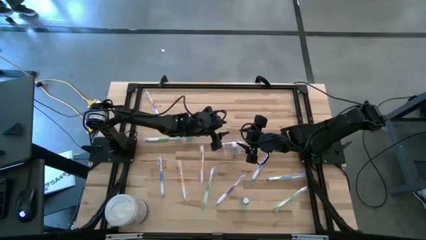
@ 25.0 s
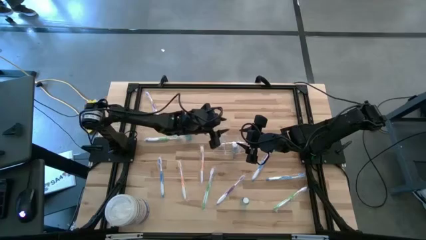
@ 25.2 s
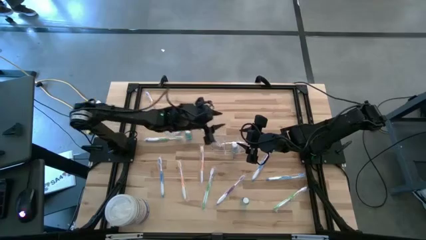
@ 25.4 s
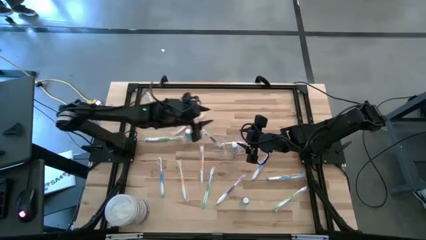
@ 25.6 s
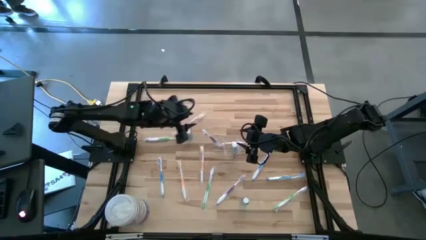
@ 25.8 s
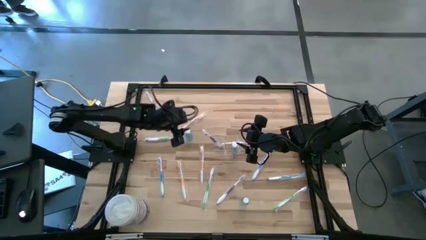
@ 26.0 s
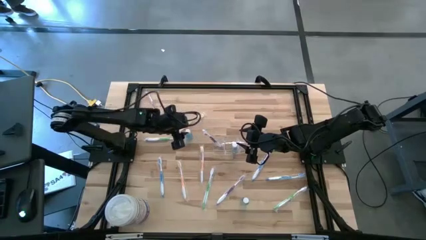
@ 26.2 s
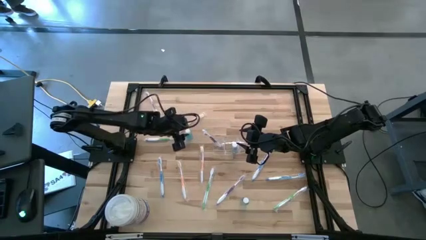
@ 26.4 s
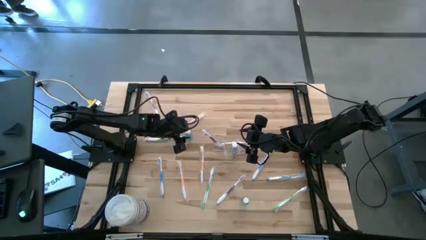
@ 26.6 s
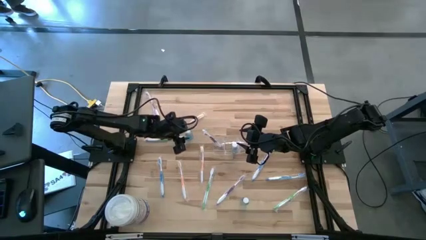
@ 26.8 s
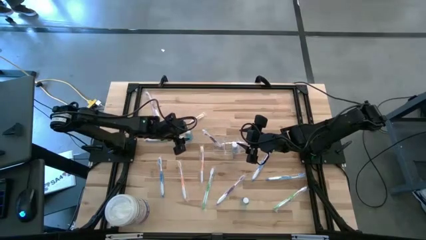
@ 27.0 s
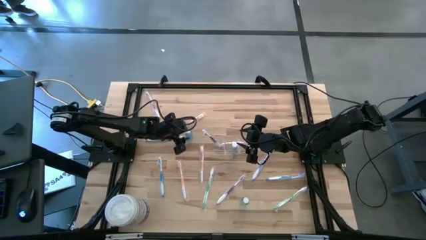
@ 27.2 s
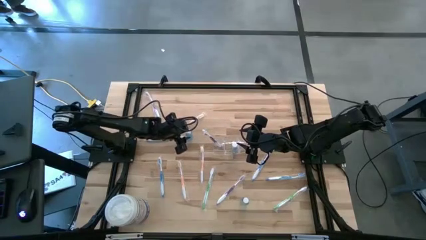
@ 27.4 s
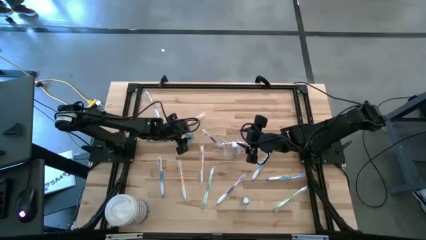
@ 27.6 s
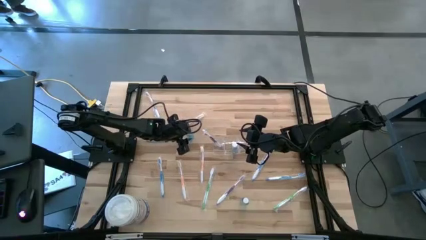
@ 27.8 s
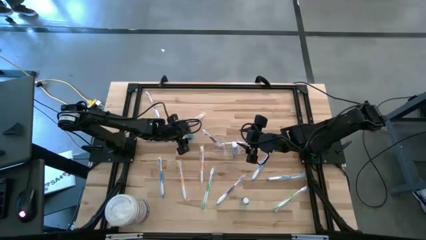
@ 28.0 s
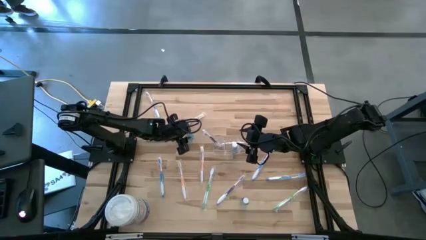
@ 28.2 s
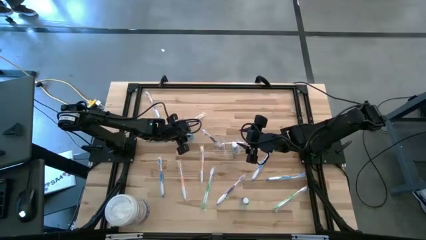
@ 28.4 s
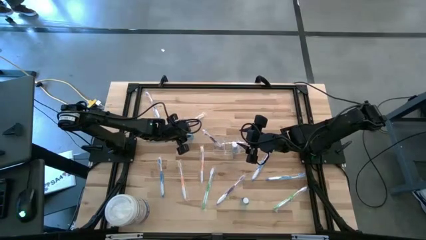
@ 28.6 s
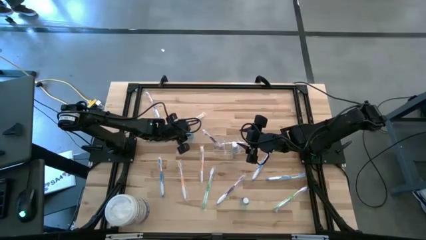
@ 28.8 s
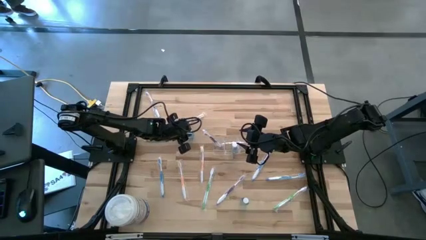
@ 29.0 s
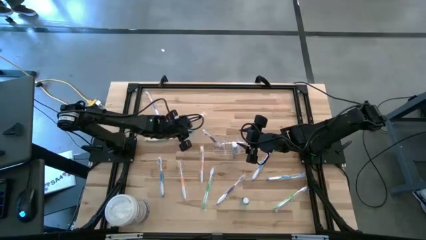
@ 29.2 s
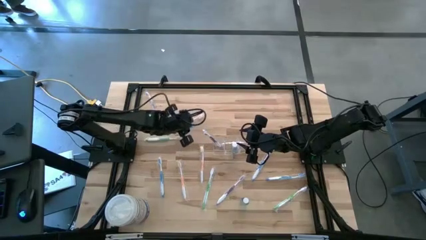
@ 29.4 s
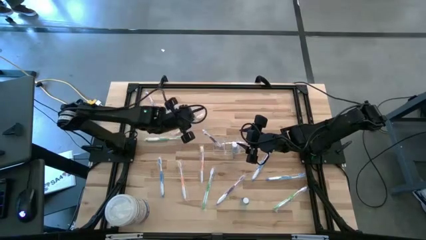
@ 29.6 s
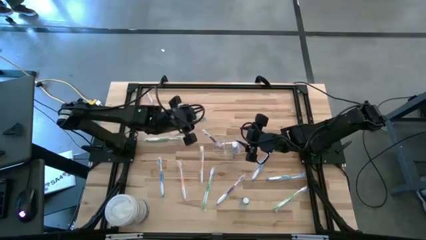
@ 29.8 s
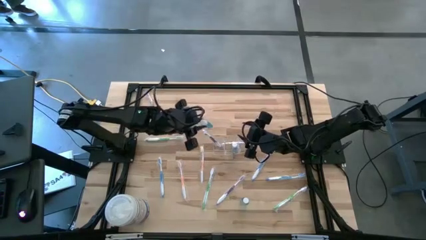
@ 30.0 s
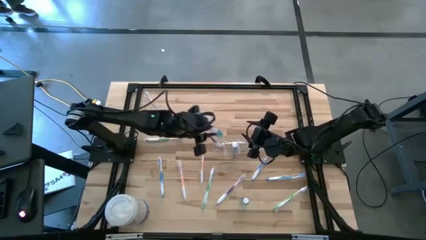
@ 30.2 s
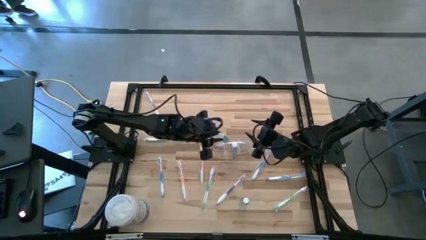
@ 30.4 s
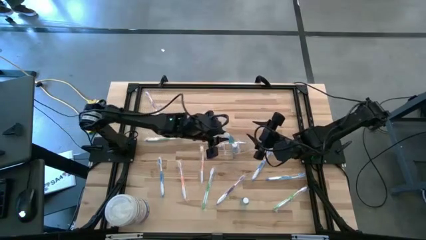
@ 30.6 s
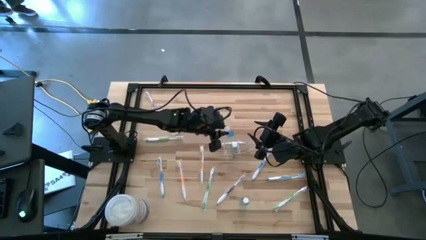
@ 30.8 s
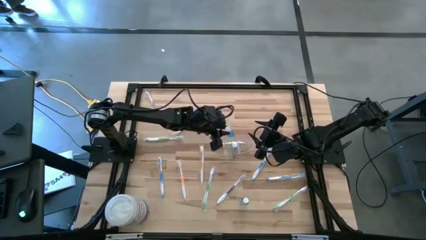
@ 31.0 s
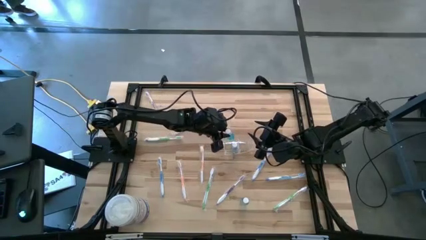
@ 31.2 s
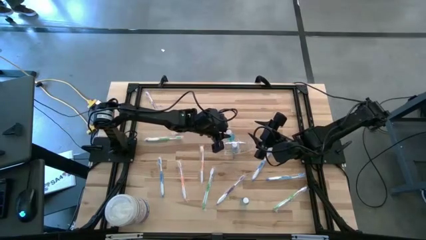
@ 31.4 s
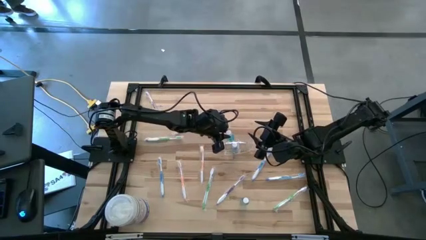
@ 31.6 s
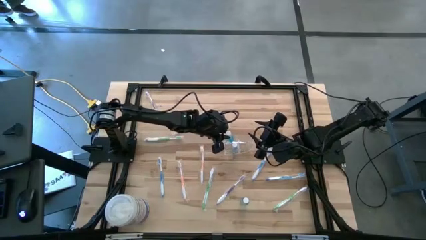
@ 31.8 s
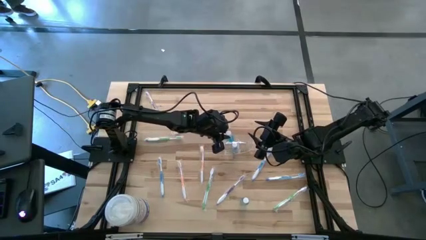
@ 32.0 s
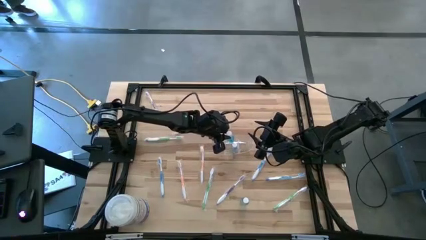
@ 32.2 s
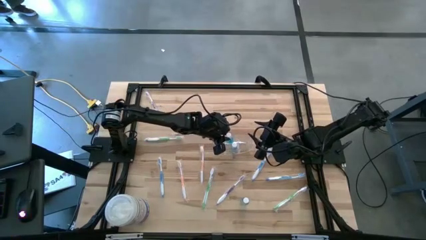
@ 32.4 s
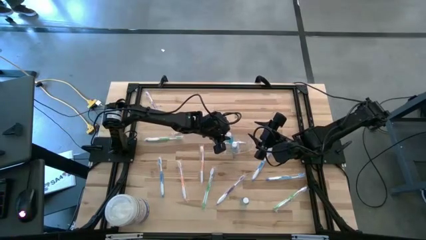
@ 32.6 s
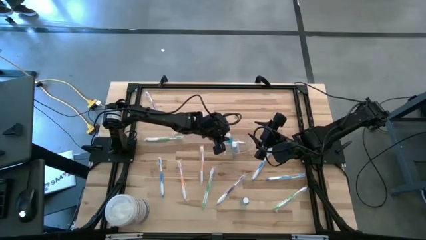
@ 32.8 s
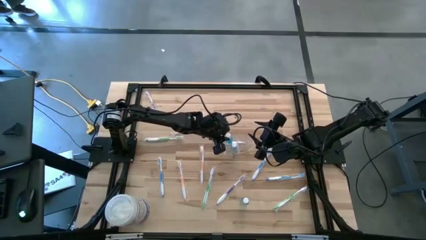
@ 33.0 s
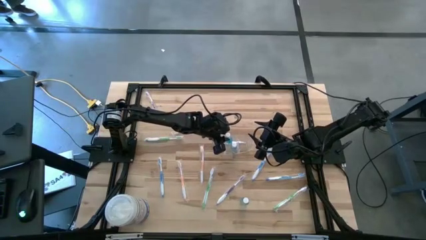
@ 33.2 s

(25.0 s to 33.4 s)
Task: Pick & Place toothbrushing station
Put the top blue mouthwash into the wire organizer

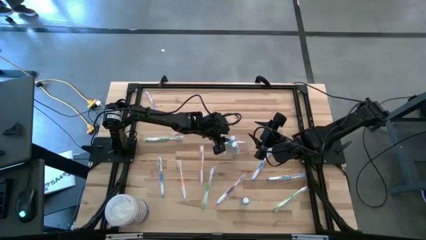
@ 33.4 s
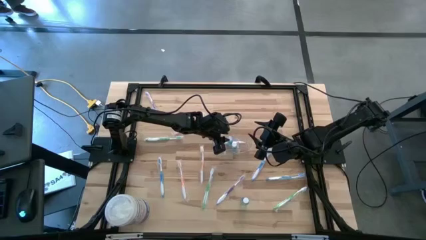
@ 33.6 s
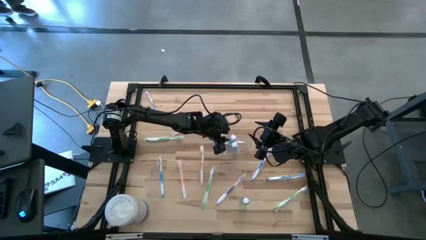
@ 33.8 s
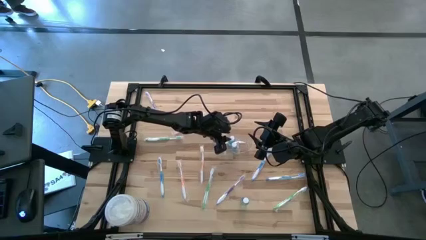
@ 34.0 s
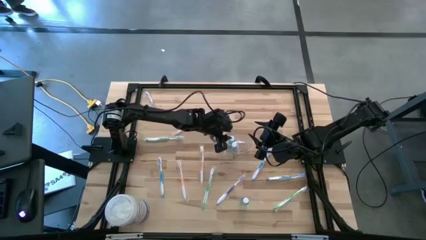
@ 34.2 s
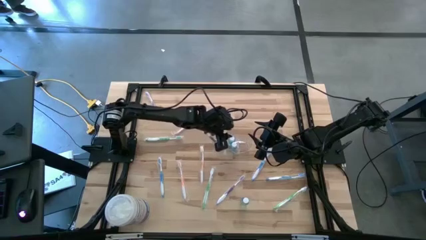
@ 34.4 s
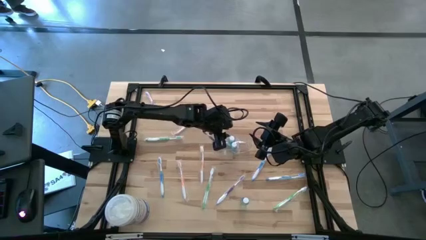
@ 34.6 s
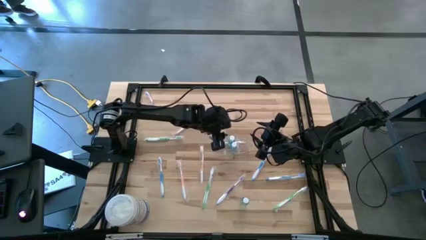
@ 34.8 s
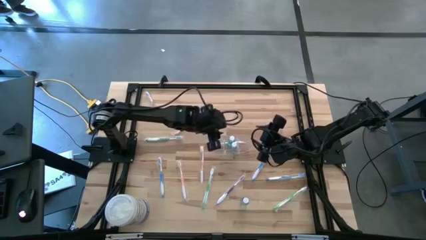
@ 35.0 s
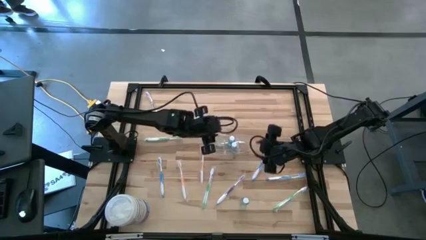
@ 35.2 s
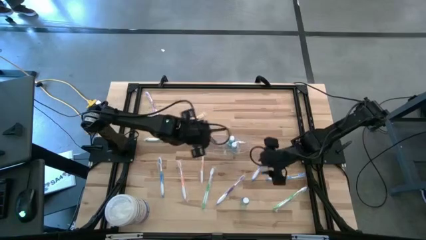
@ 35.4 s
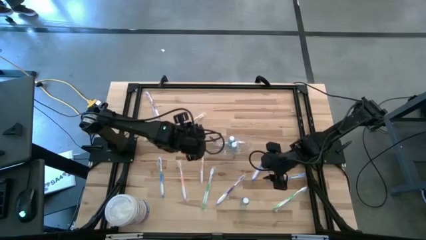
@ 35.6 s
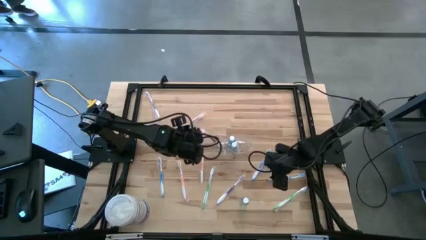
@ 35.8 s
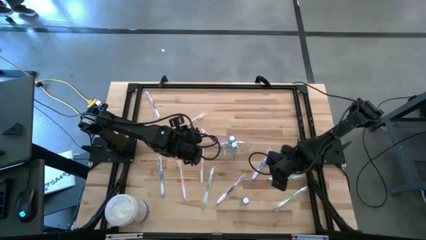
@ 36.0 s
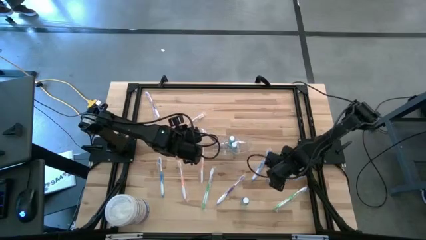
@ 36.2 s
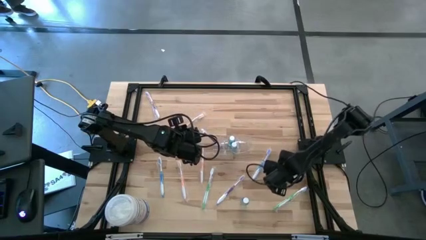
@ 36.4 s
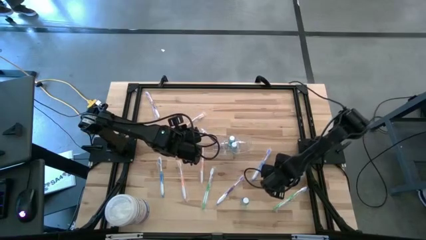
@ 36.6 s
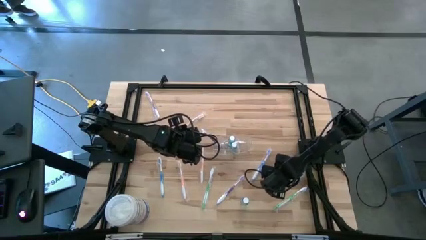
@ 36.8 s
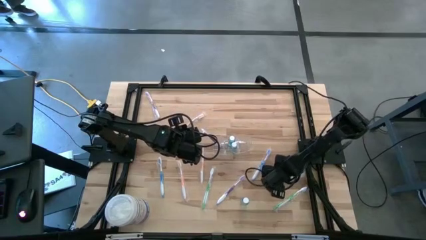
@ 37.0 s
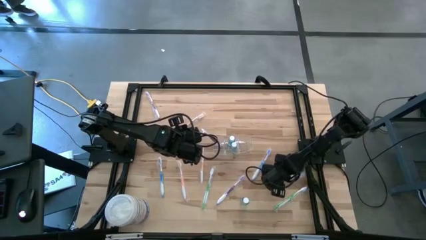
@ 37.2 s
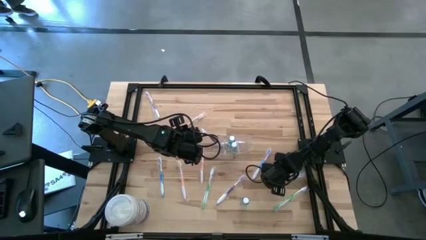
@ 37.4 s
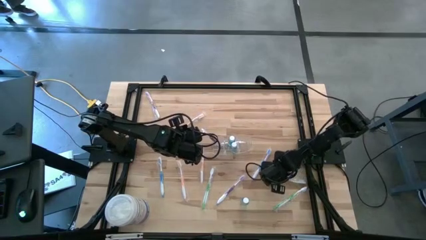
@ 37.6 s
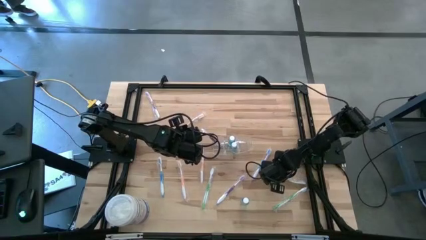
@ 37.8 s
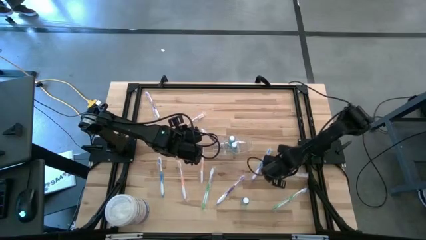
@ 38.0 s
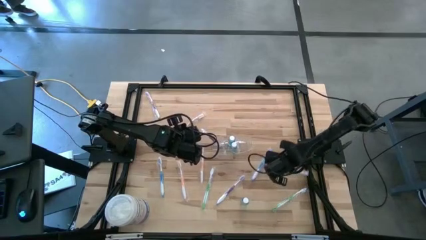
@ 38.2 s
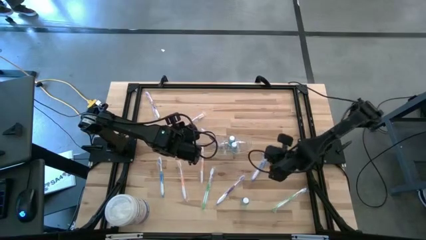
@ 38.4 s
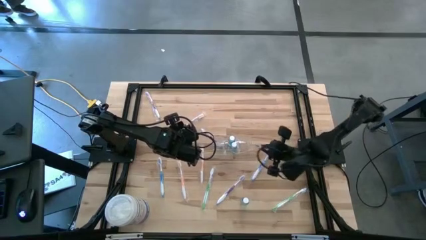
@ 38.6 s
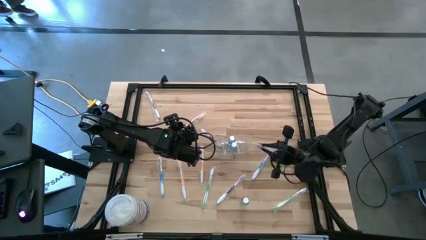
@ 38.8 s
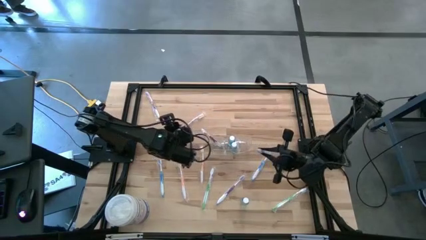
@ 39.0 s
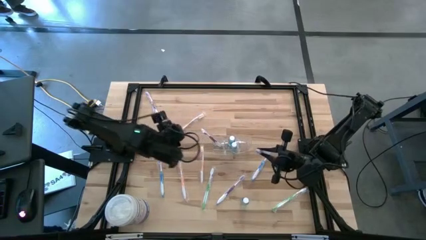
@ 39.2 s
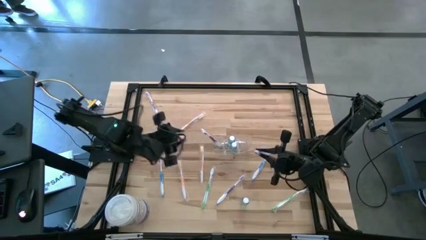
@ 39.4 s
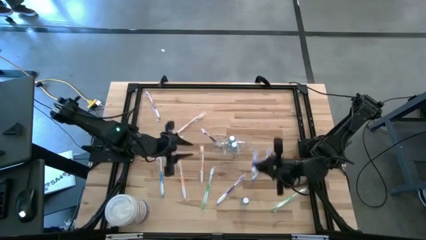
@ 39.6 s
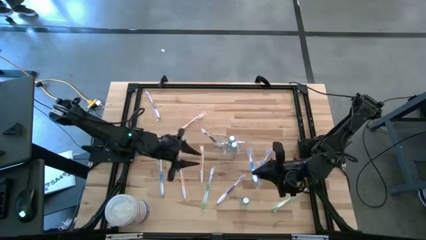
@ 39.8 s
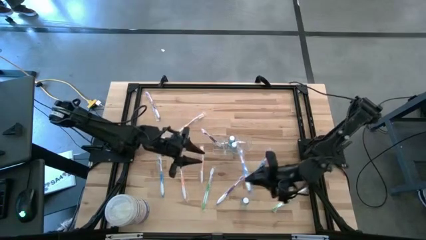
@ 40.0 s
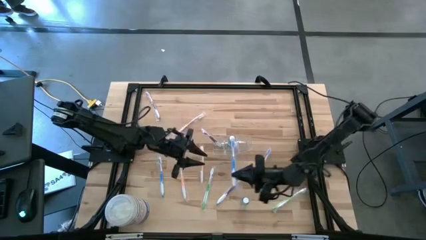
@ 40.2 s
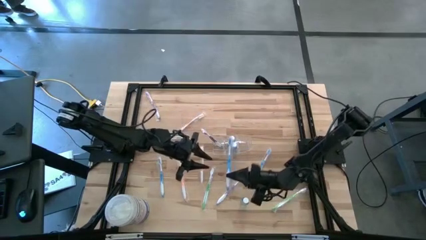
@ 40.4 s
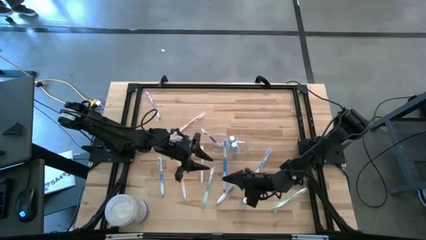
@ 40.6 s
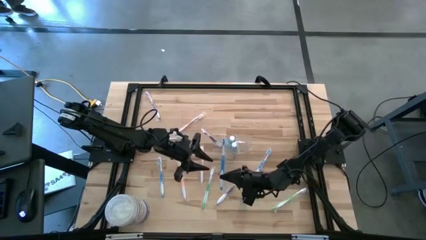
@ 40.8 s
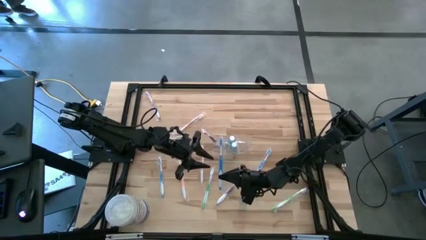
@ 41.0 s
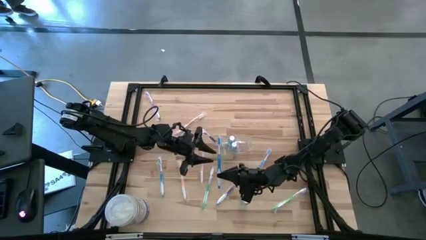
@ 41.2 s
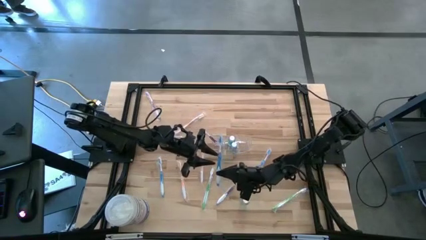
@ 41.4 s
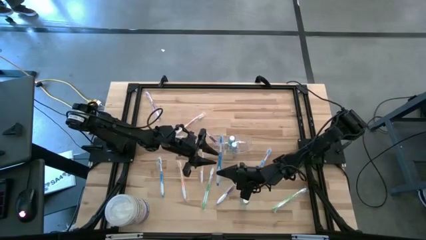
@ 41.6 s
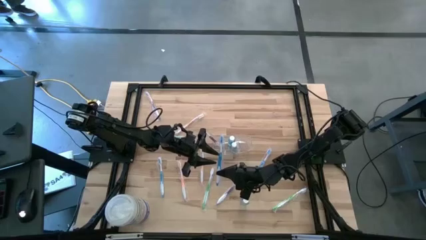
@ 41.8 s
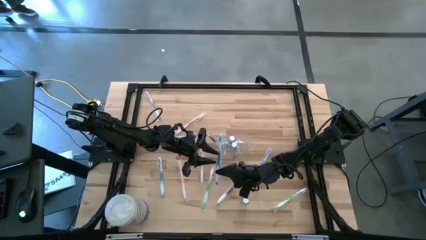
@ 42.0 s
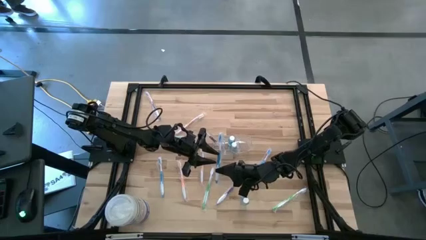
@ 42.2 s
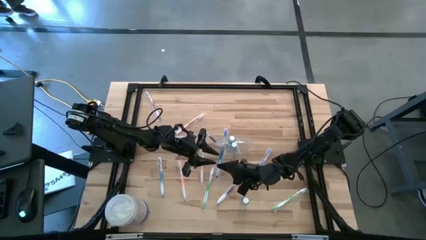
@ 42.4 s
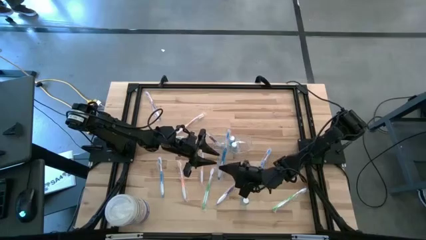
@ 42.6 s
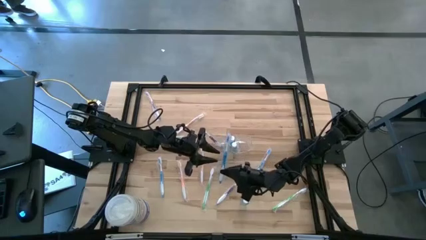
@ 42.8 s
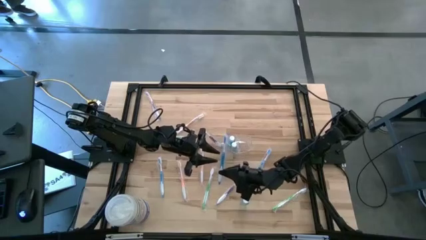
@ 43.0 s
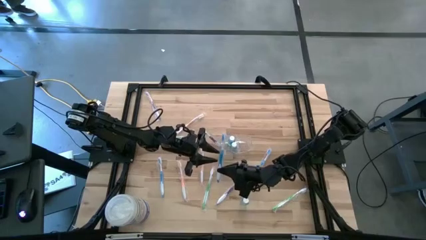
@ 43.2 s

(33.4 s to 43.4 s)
Put the right blue toothbrush into the wire organizer
